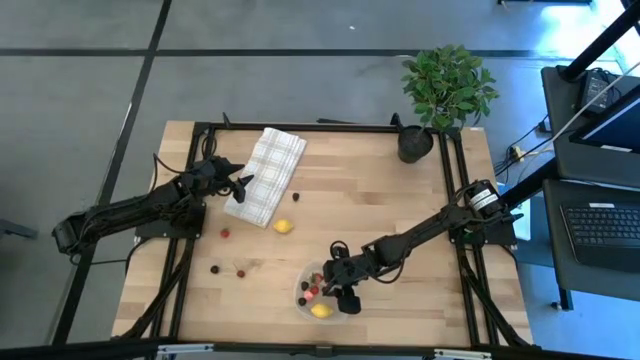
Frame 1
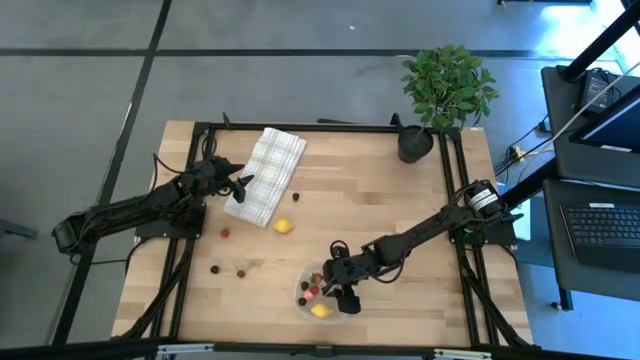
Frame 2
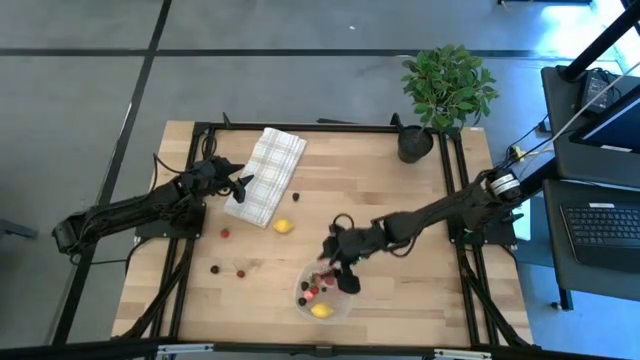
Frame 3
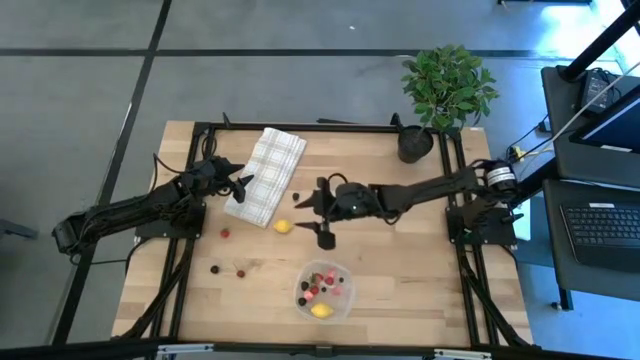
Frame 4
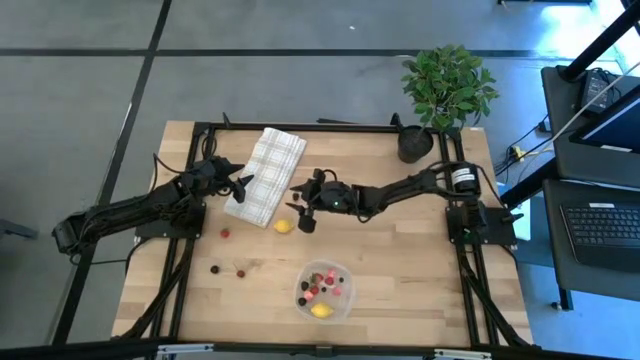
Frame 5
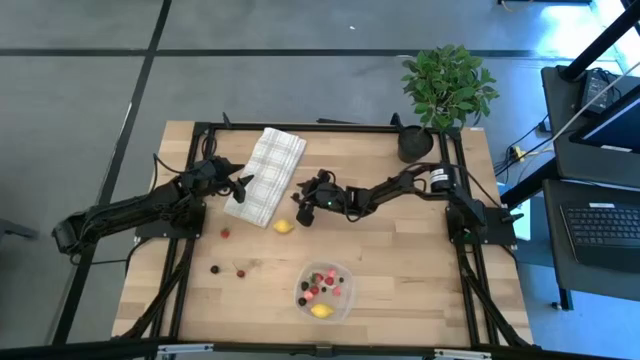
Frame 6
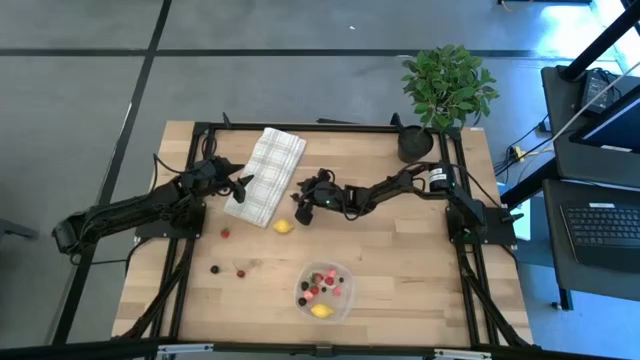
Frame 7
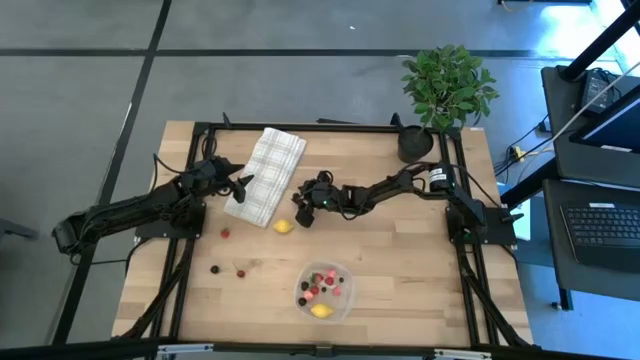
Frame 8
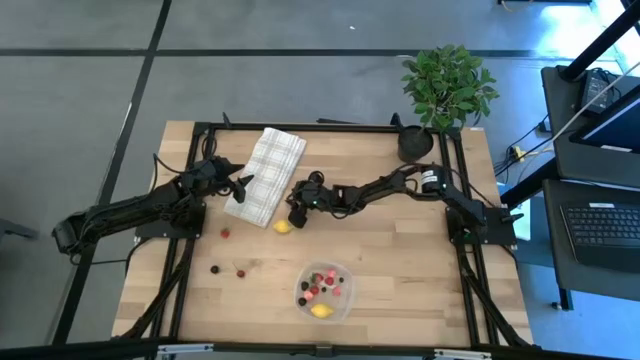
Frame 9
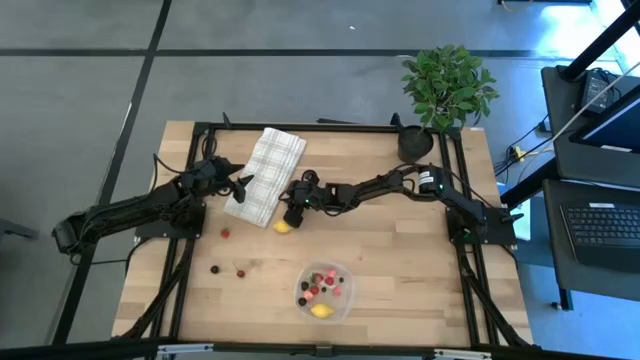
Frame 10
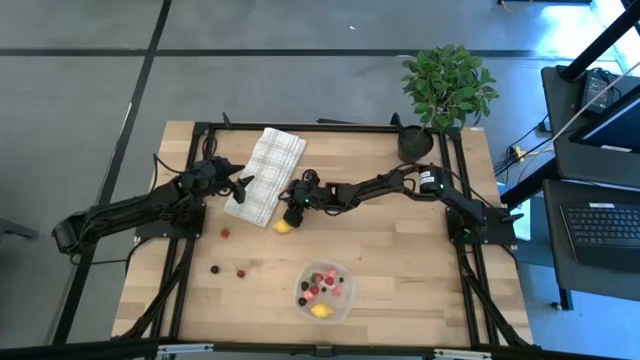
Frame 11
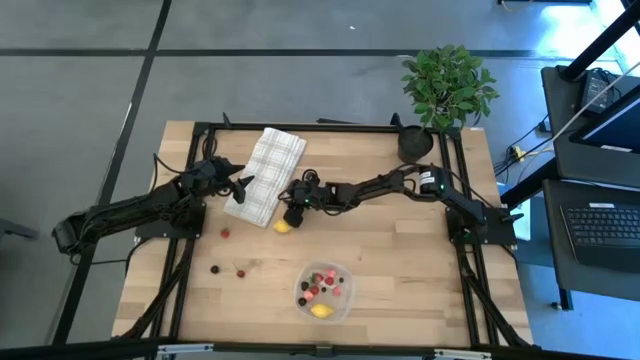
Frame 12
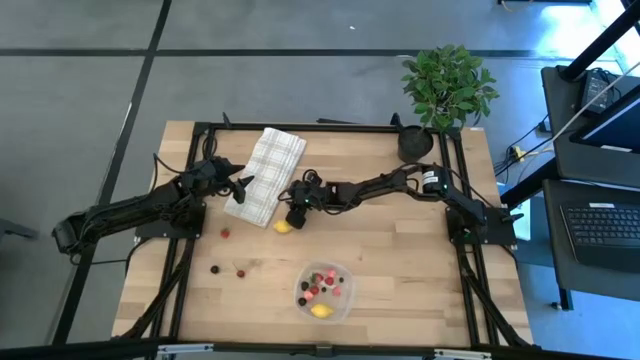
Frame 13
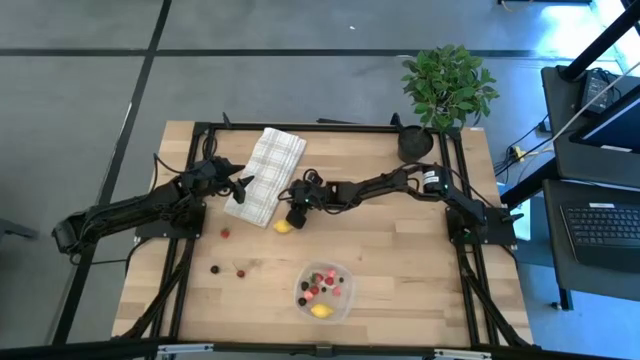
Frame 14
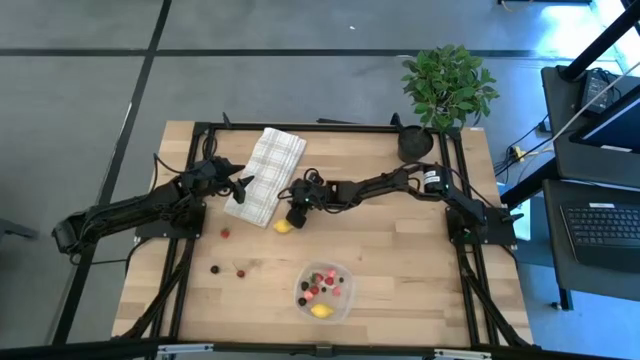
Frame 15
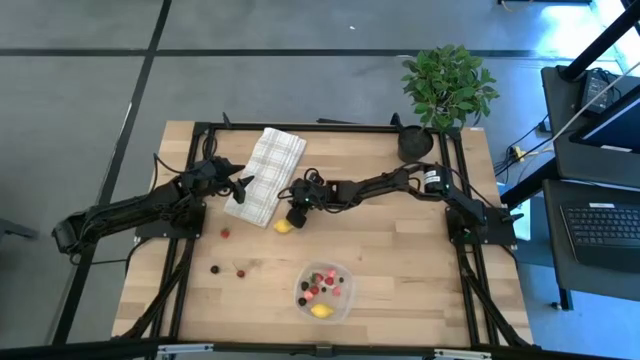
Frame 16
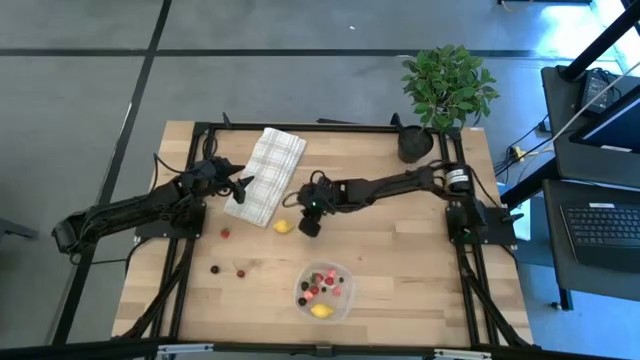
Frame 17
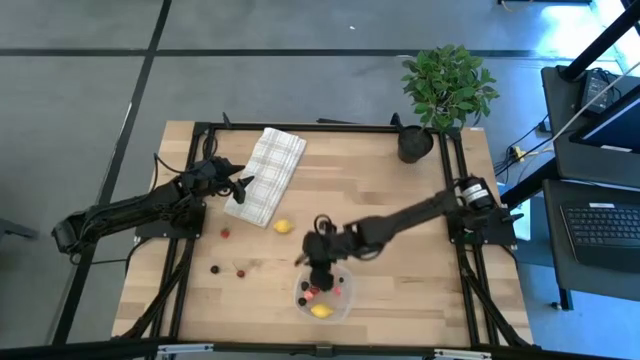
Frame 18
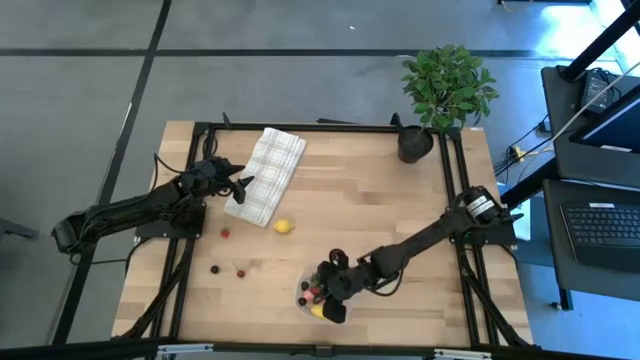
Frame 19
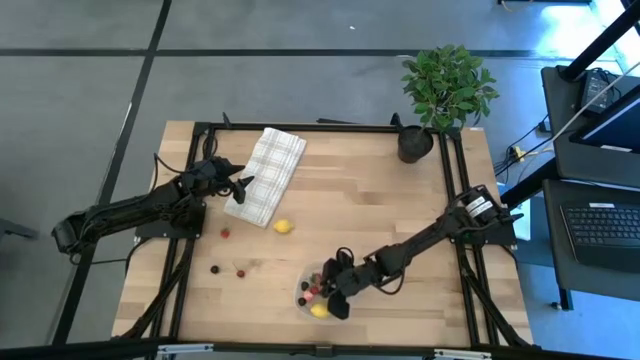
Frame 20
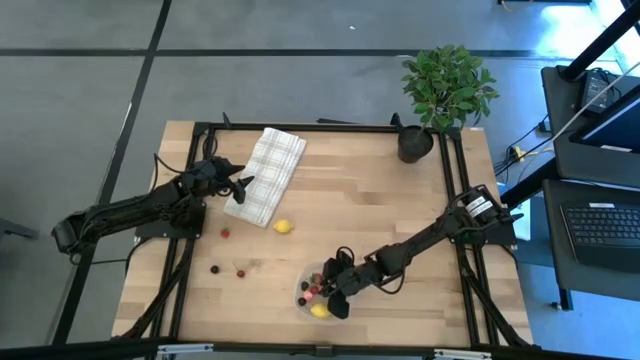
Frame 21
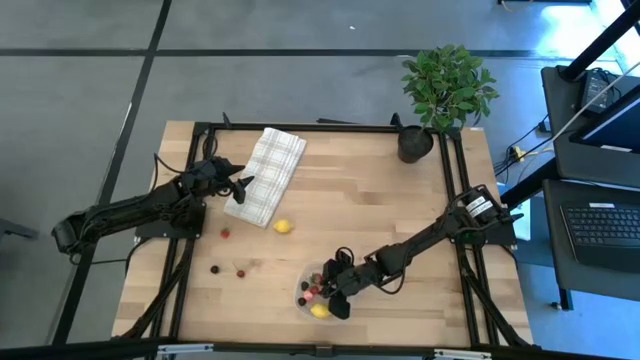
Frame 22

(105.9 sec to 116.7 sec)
Task: Pick and placing Produce into tupperware
Put the black raspberry into the transparent bin

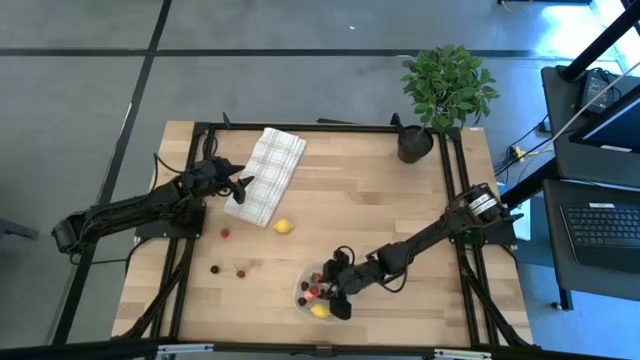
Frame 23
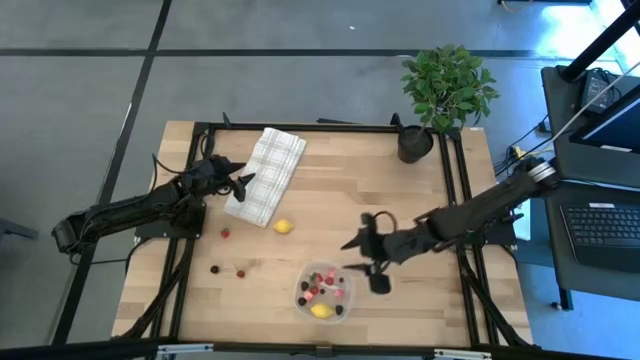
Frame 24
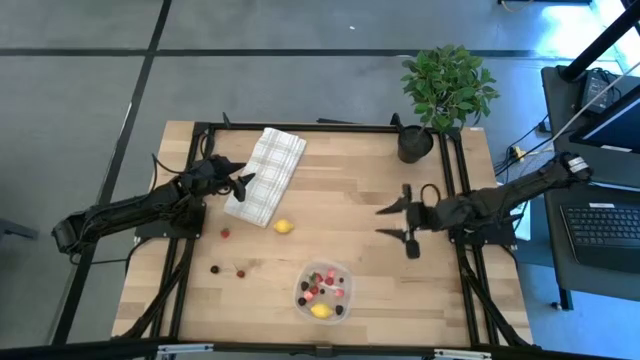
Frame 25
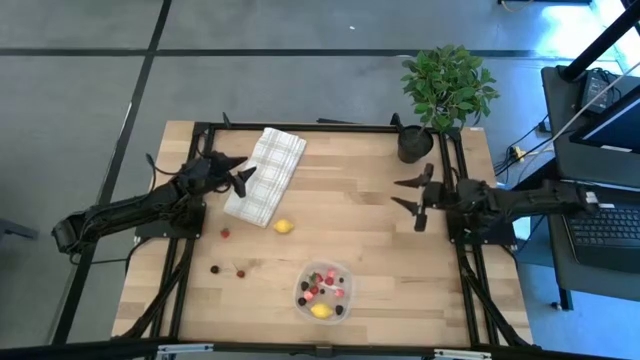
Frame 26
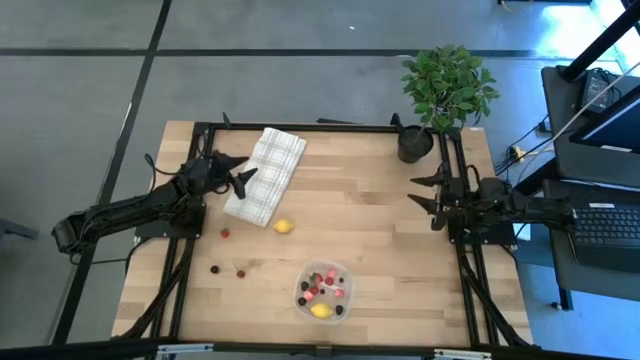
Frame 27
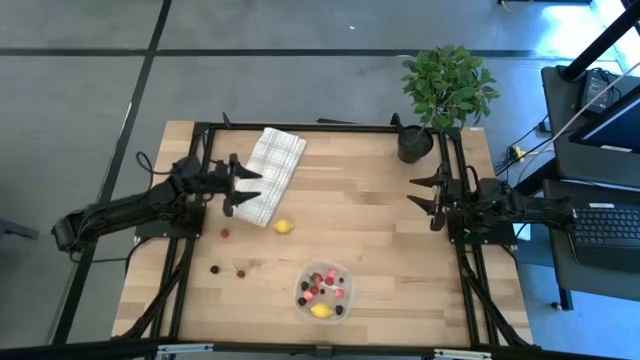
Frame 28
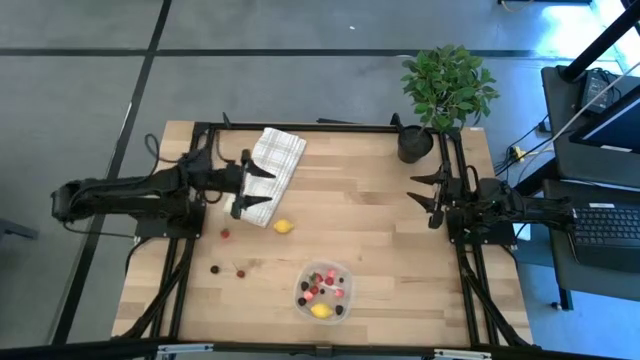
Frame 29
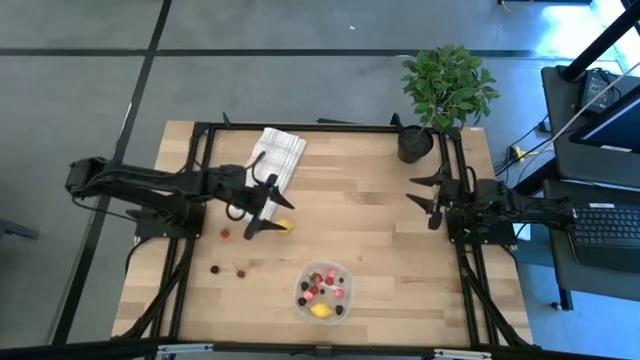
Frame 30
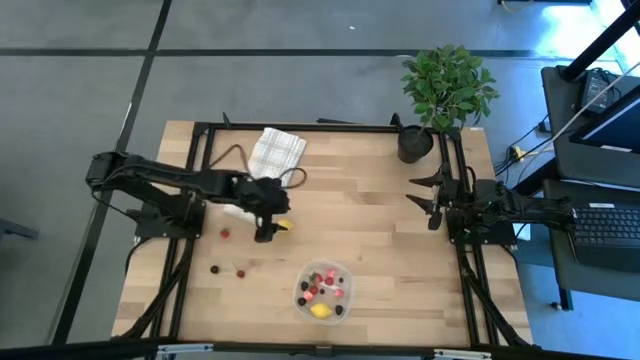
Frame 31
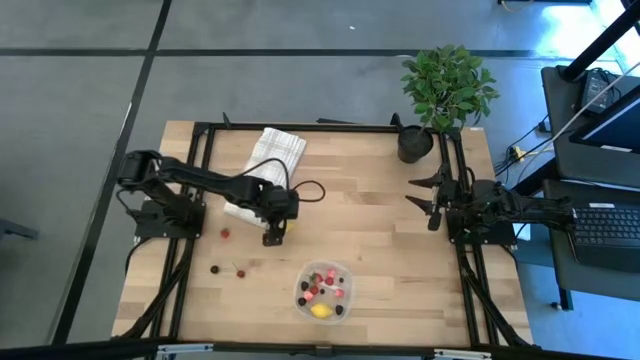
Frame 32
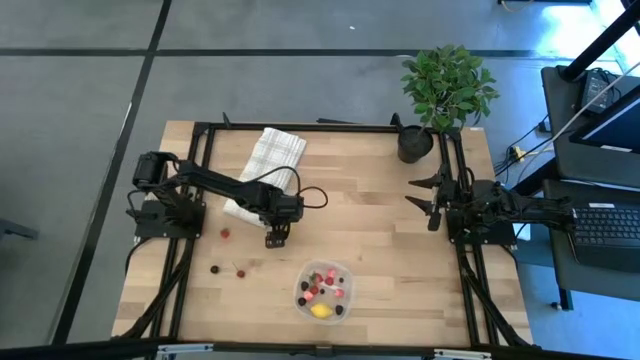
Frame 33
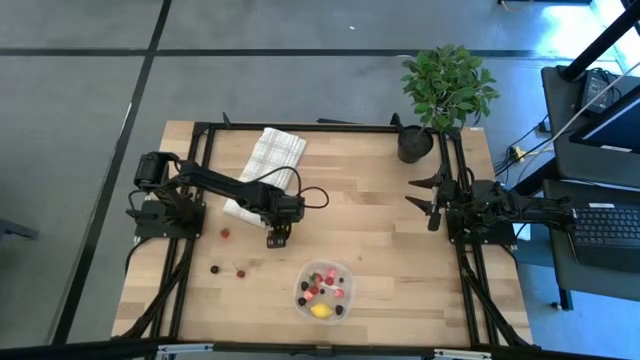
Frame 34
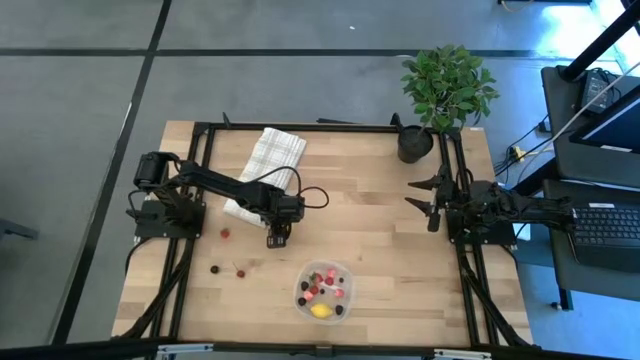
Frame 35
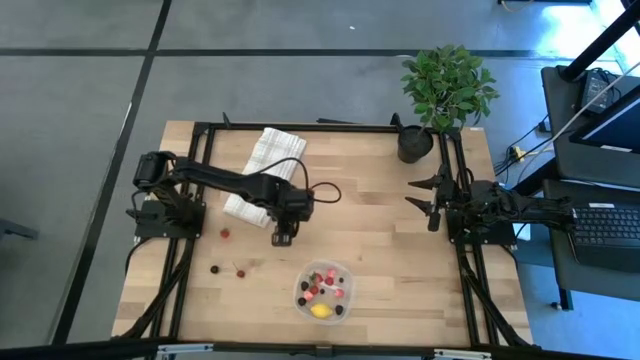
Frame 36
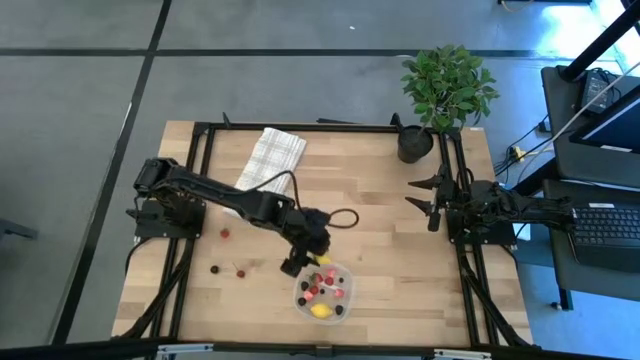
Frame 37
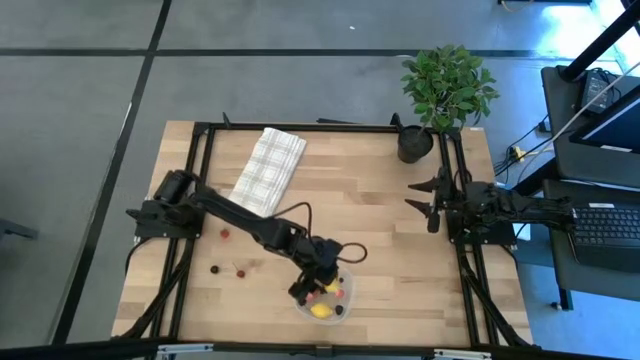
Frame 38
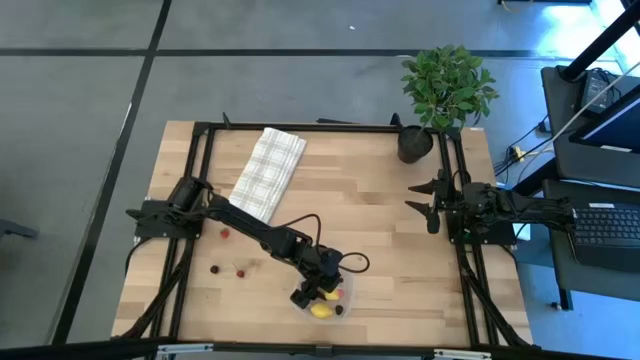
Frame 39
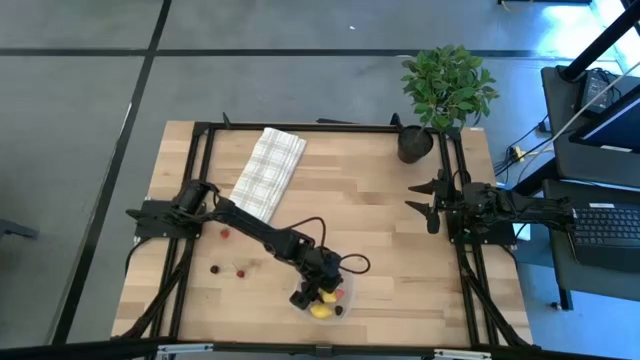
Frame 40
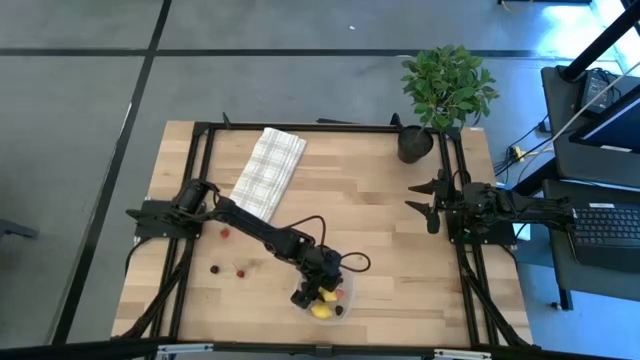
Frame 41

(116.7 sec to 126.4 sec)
Put the lemon into the transparent bin

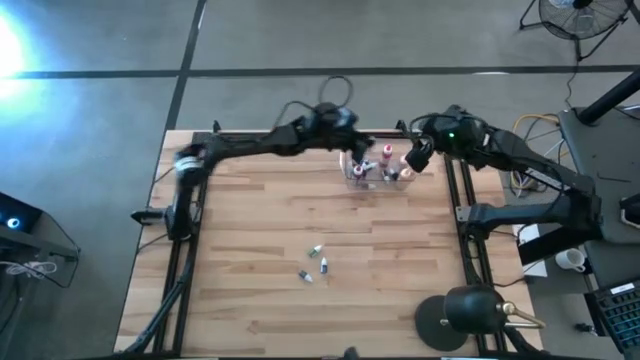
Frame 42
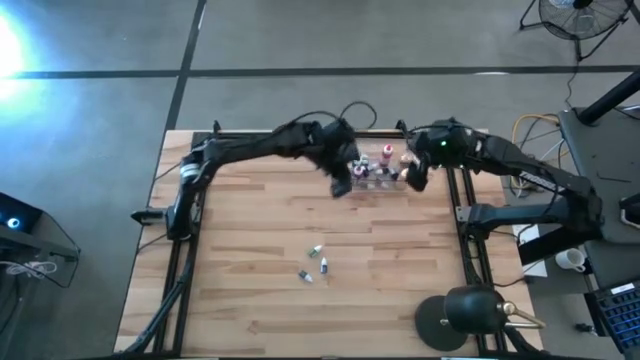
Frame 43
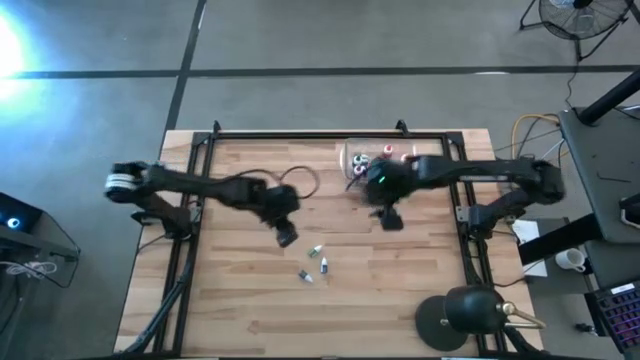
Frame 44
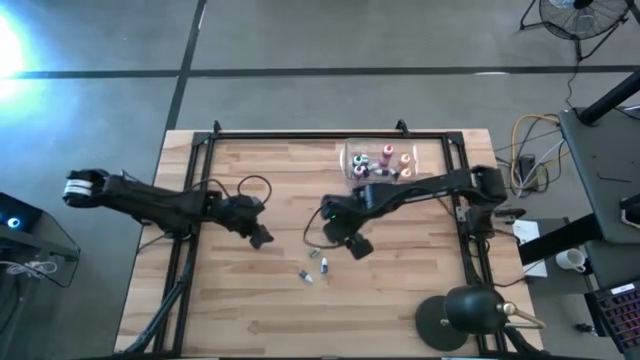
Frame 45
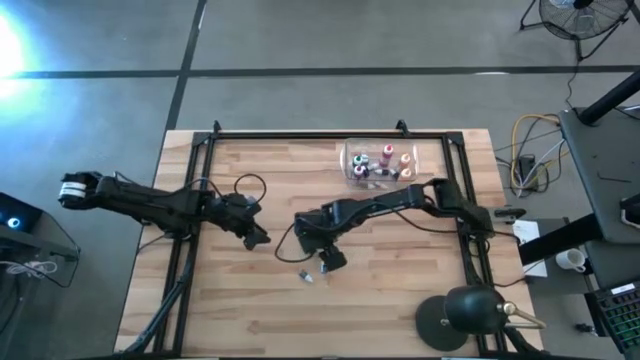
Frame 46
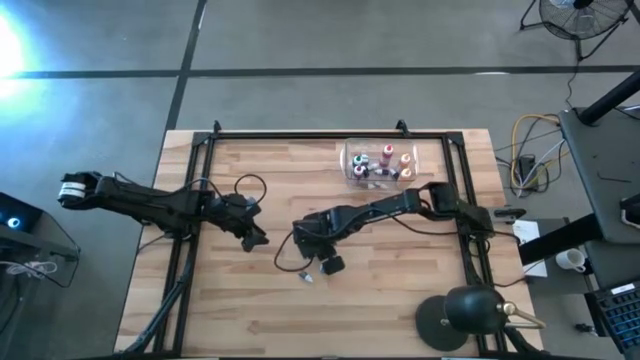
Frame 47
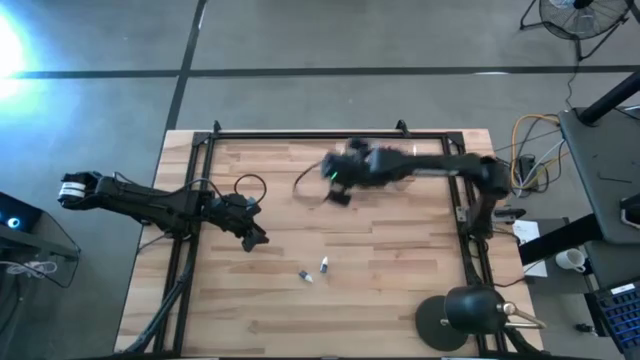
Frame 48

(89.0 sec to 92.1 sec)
Task: Pick & Place food coloring
Put the small green food coloring bottle into the transparent bin
